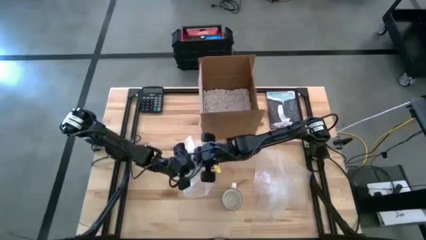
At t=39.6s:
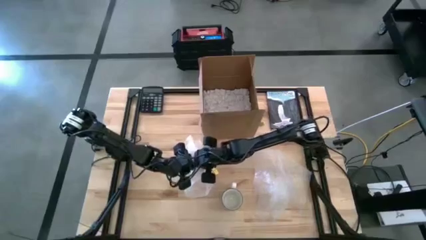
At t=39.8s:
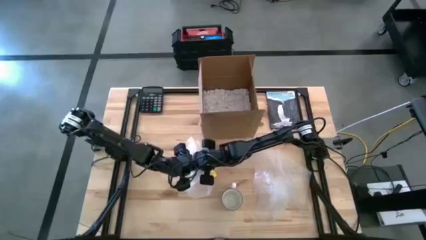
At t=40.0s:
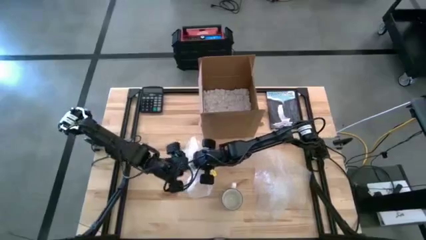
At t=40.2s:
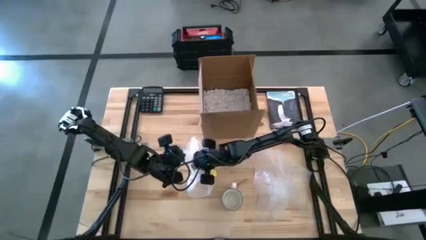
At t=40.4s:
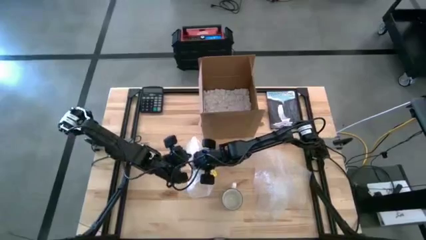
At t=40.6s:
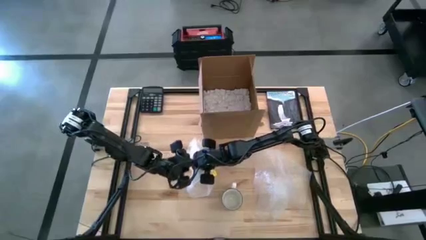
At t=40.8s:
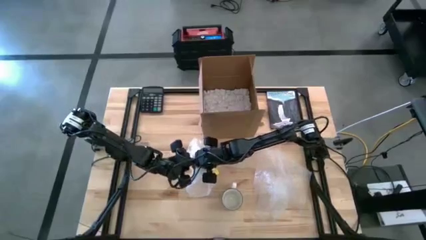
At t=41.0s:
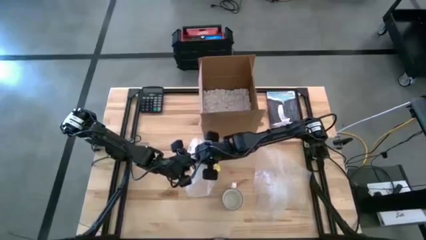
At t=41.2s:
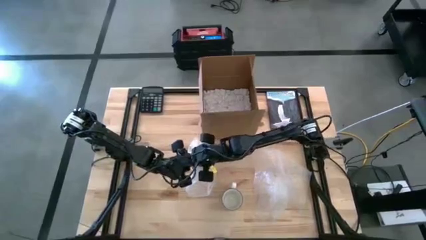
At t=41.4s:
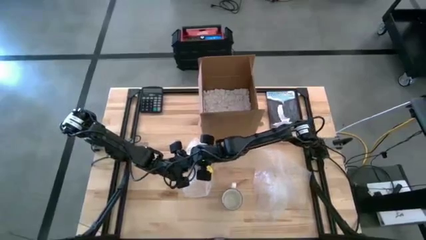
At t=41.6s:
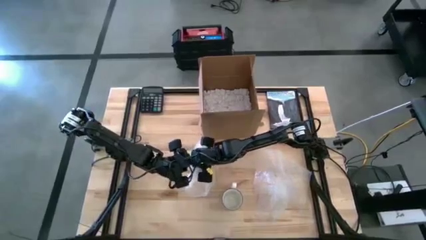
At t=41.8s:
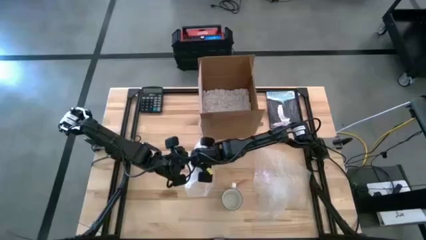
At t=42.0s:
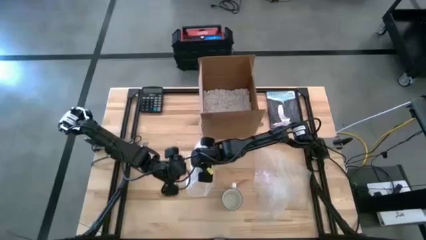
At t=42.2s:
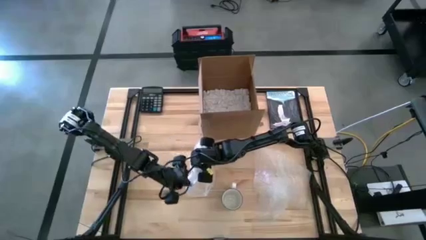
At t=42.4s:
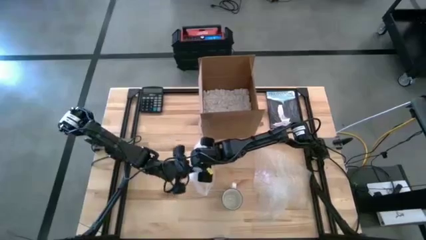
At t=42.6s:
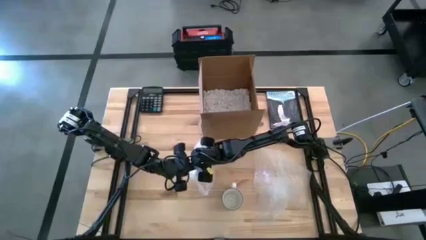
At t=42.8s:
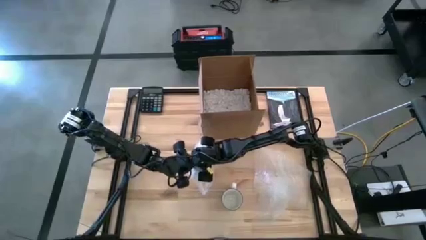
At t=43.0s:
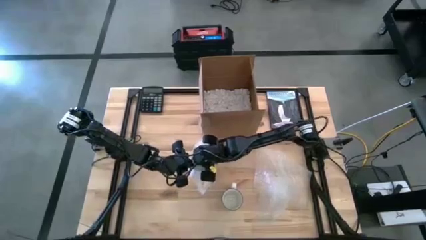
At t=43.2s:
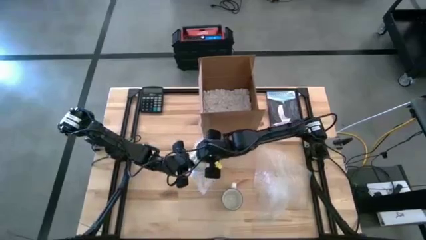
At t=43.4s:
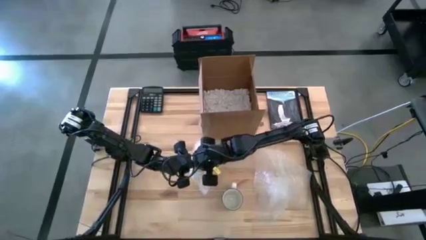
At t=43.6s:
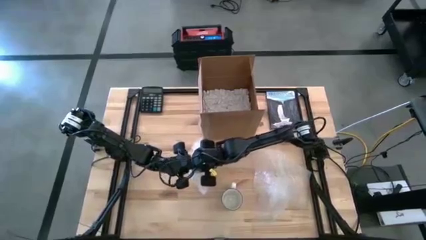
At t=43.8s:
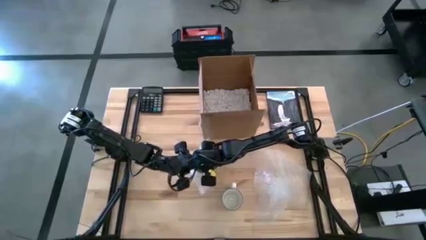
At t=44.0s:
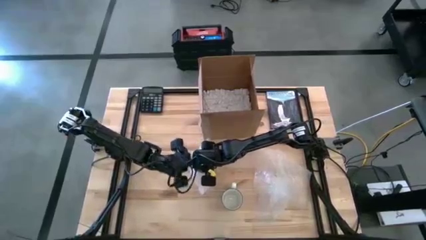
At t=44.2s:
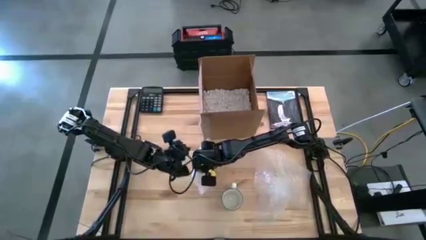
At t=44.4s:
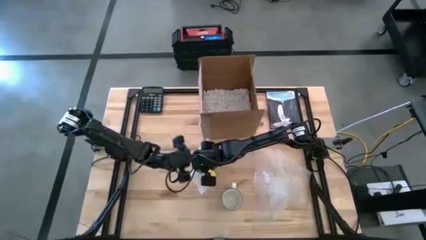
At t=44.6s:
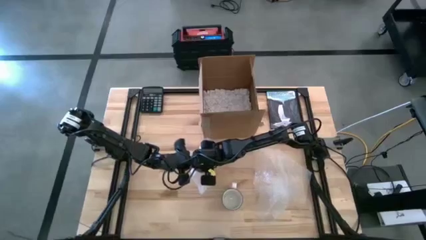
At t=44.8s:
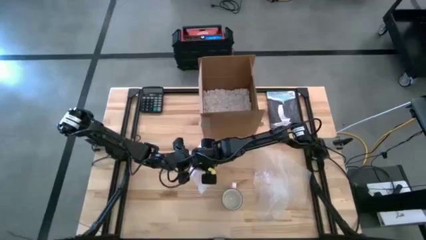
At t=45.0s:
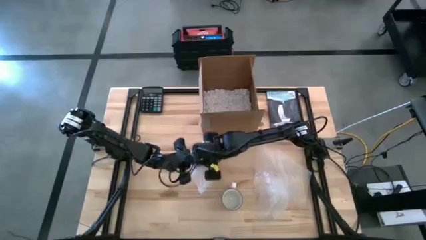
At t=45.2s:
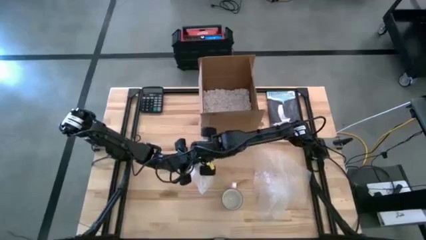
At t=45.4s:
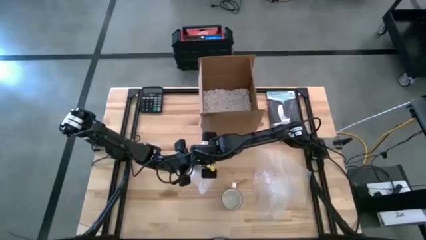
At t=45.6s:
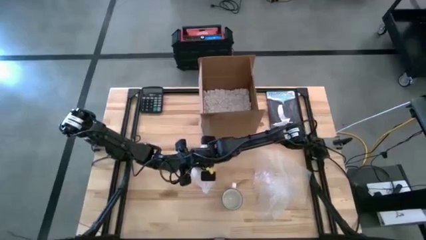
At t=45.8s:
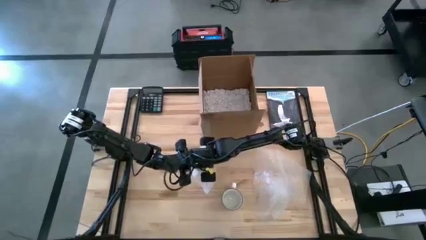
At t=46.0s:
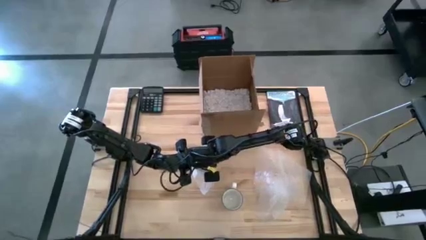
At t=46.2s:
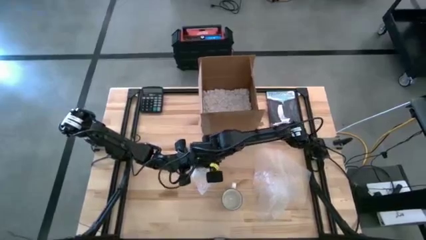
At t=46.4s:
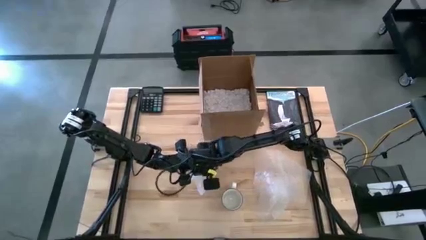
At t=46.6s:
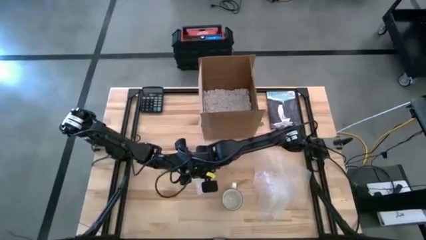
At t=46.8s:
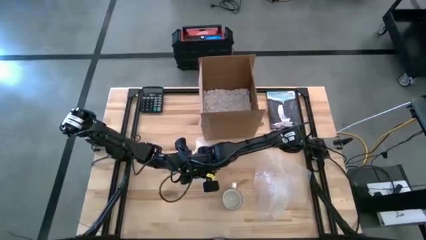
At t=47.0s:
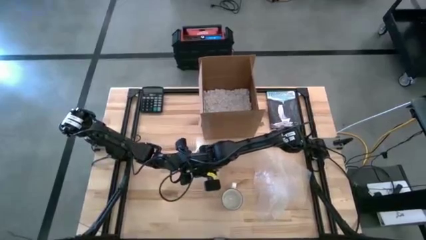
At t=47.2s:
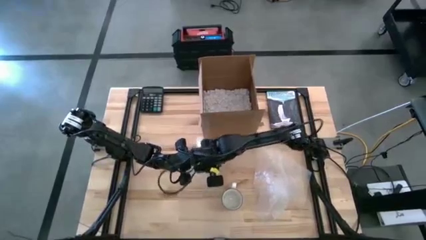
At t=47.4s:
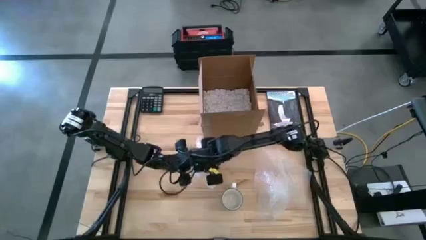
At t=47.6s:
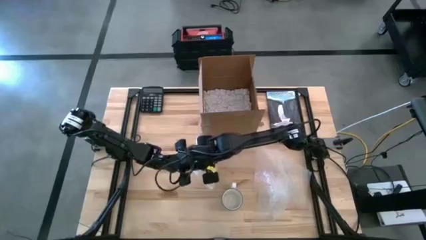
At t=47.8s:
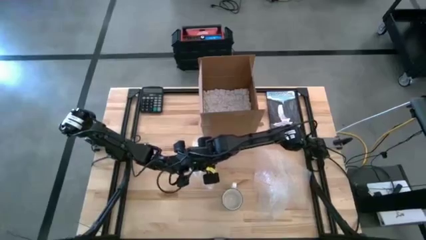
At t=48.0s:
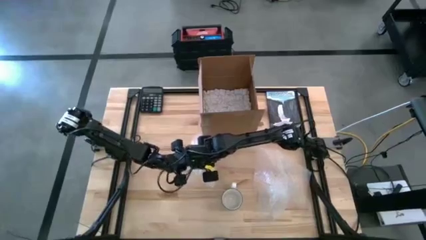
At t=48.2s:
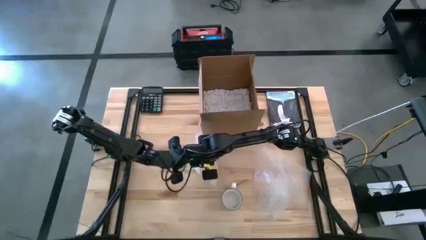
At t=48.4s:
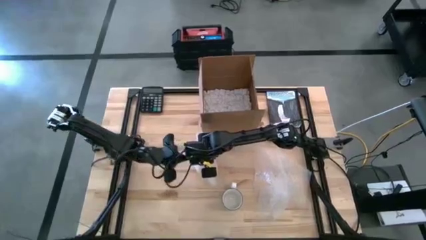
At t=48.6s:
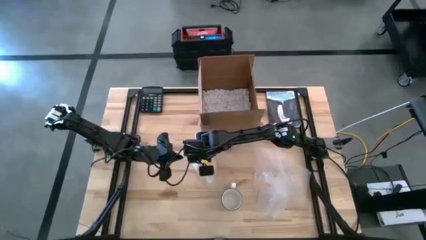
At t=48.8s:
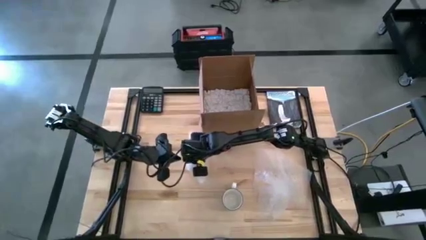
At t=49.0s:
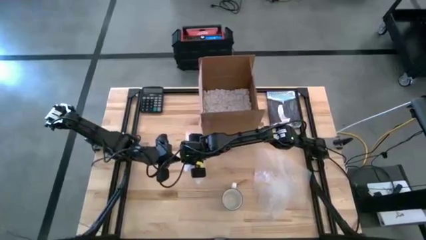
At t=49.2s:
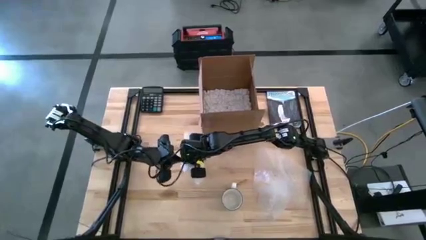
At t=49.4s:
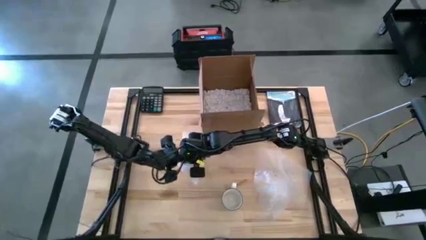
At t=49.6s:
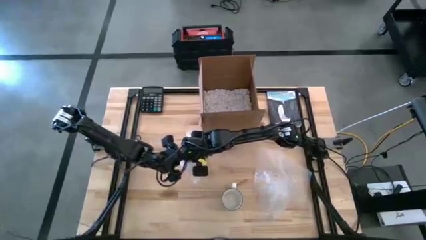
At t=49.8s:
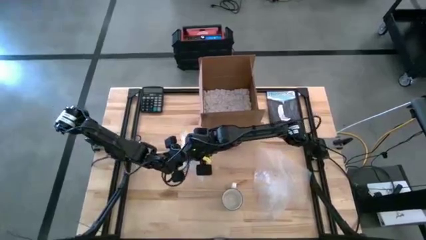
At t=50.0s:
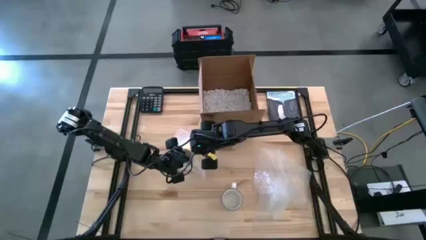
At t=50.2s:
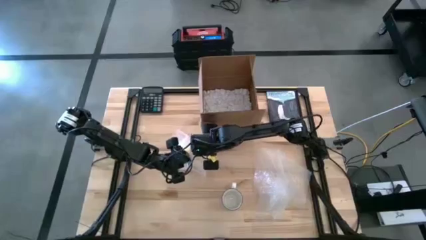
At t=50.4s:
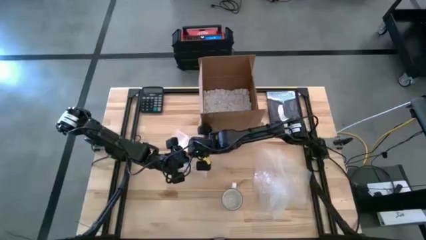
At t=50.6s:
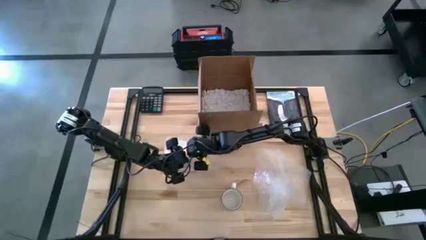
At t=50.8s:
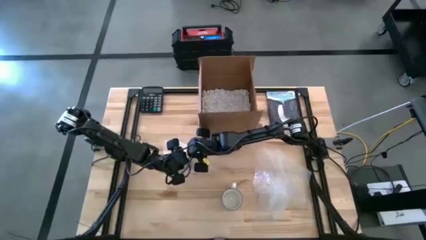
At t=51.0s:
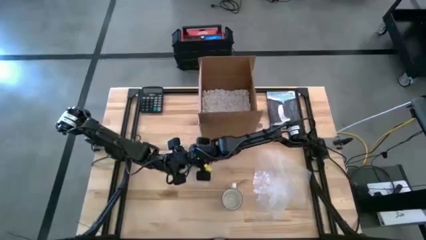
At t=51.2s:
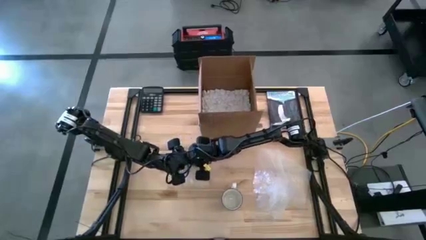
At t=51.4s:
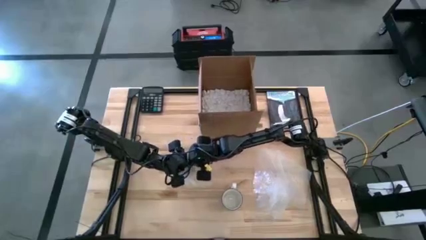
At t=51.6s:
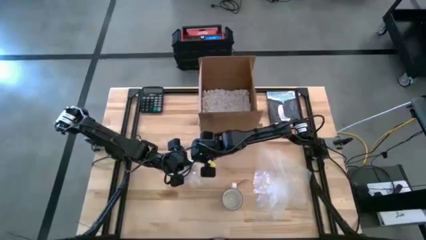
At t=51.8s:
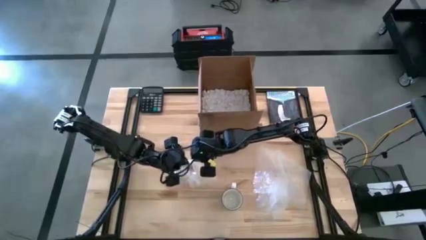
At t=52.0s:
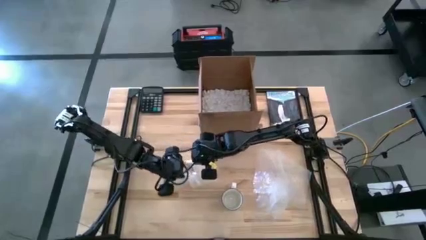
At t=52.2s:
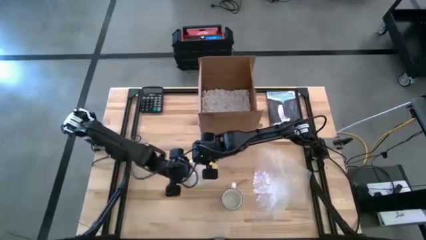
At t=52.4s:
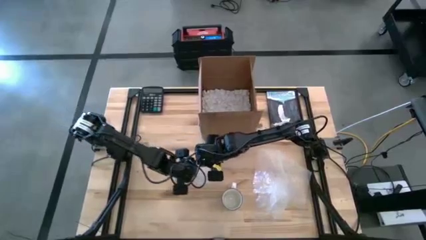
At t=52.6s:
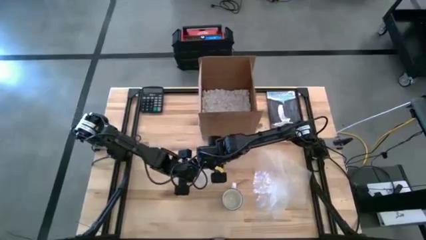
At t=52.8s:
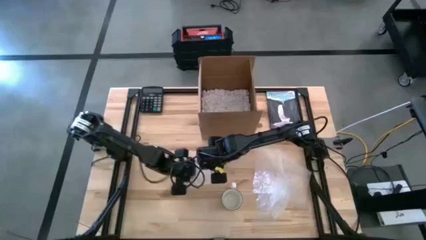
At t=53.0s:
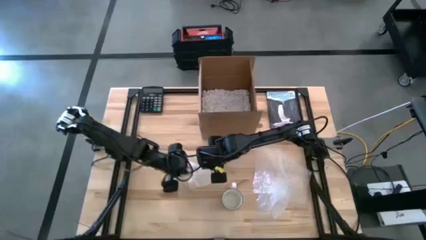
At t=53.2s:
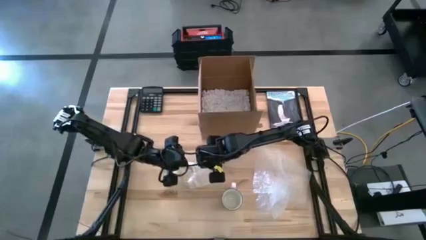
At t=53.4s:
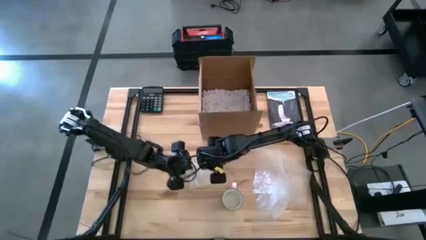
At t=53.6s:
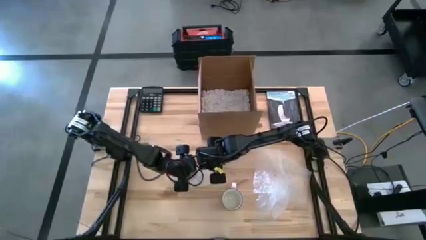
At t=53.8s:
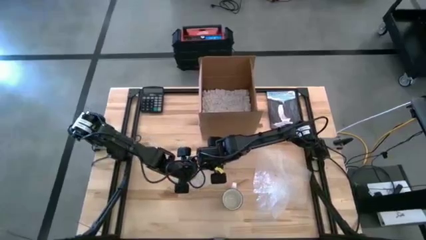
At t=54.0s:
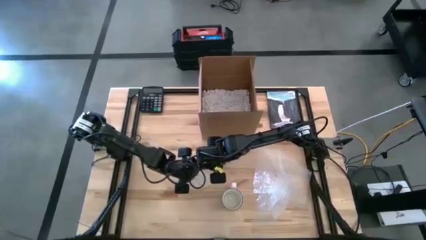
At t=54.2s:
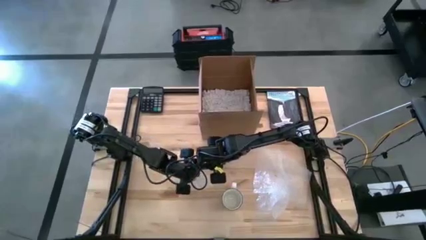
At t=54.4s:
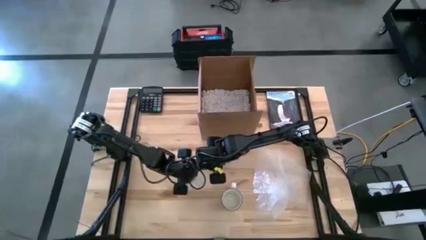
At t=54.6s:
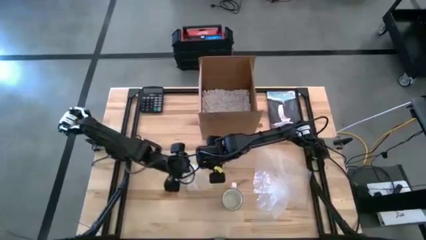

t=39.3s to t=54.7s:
Task: wrap mug
Wrap the yellow mug in bubble wrap

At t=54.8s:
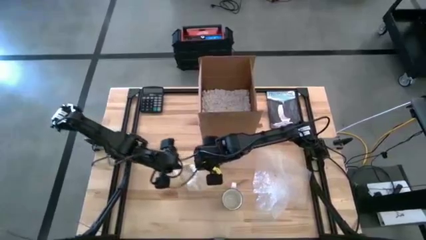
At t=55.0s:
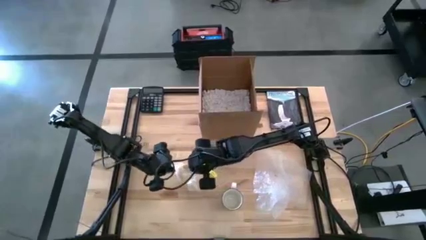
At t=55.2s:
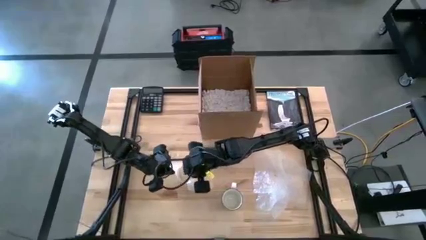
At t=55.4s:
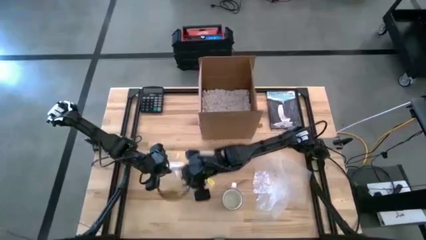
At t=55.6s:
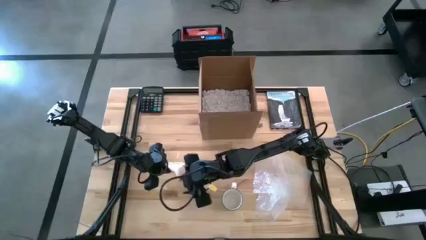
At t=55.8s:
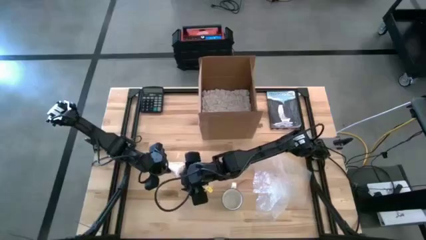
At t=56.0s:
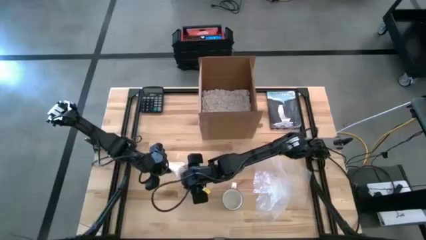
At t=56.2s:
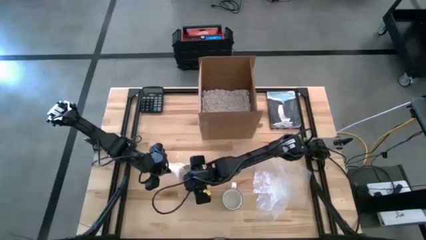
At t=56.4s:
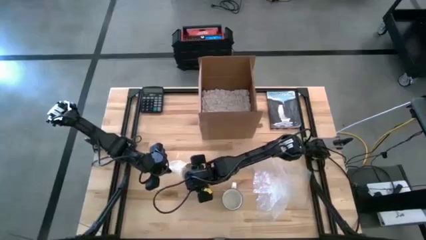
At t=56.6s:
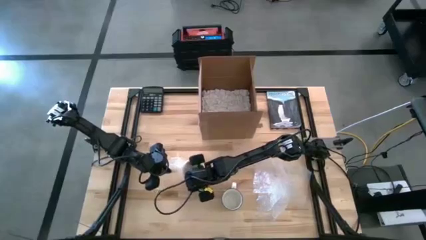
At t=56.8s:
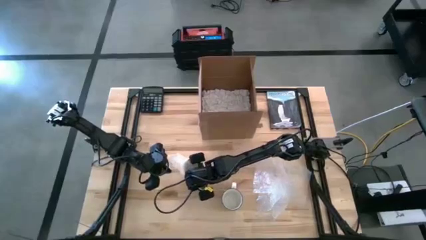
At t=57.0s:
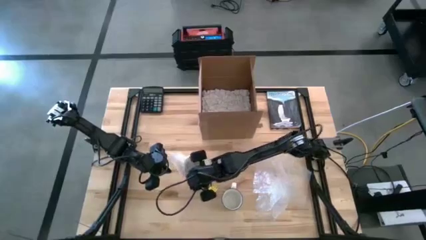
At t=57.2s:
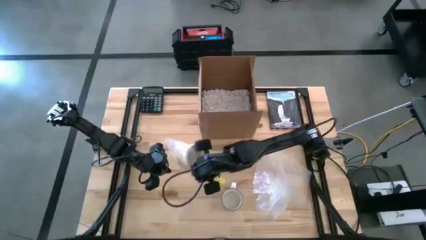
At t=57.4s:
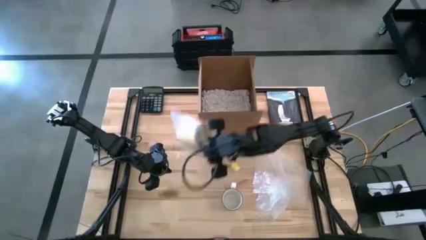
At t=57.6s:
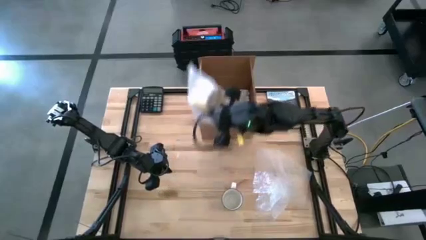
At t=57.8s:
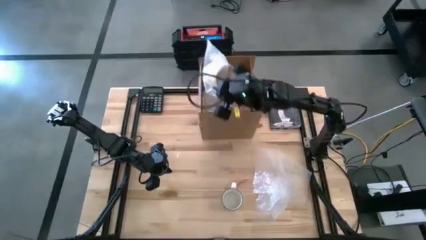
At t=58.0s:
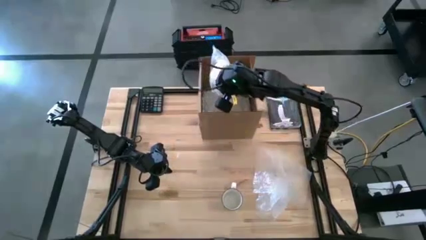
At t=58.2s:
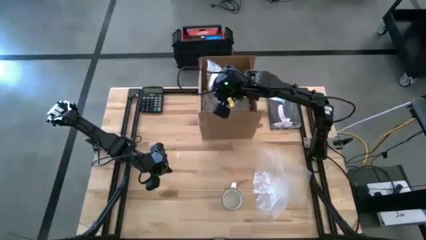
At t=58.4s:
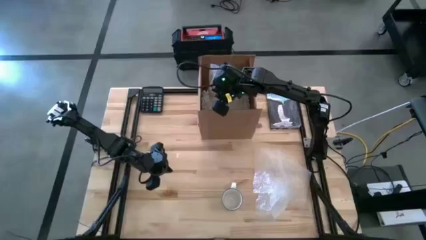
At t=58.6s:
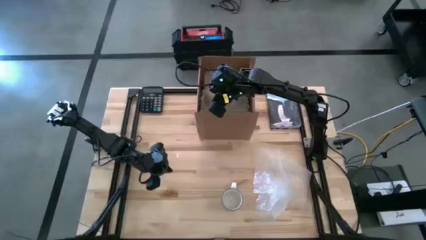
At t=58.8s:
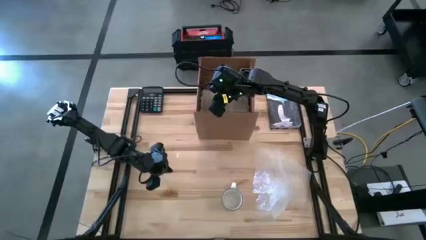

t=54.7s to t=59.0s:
Put the yellow wrapped mug into the brown cardboard box
